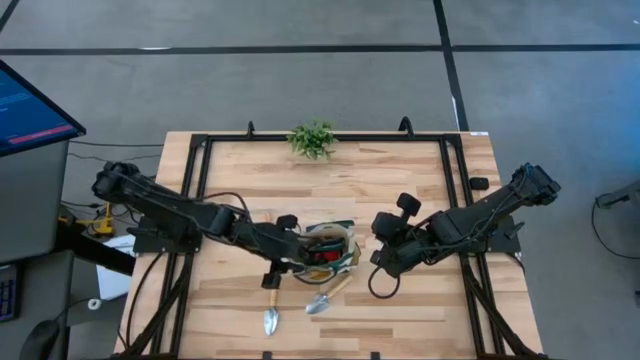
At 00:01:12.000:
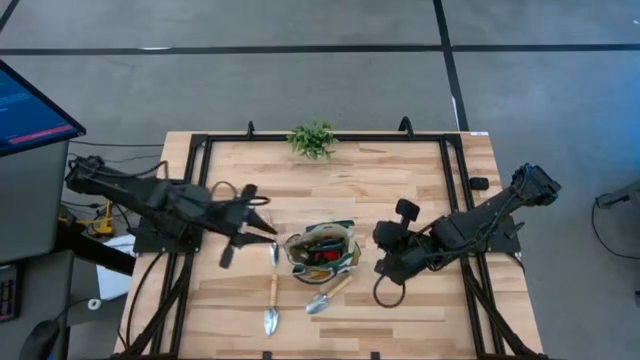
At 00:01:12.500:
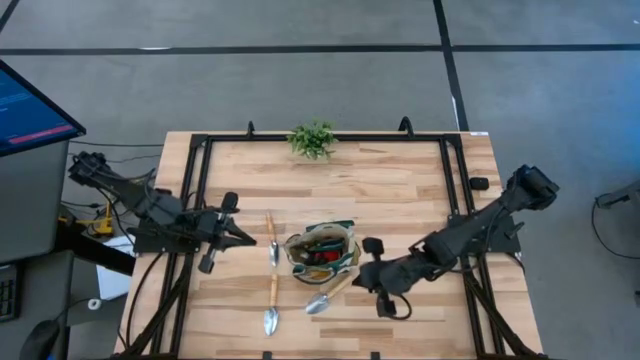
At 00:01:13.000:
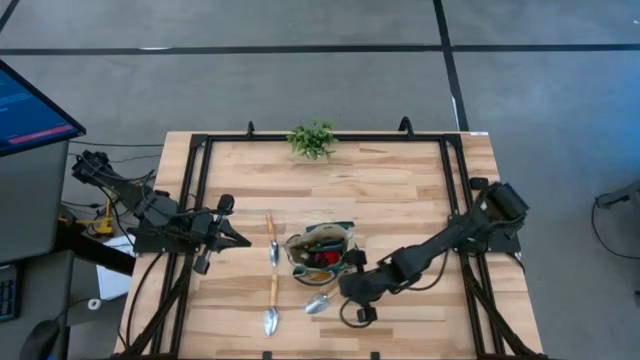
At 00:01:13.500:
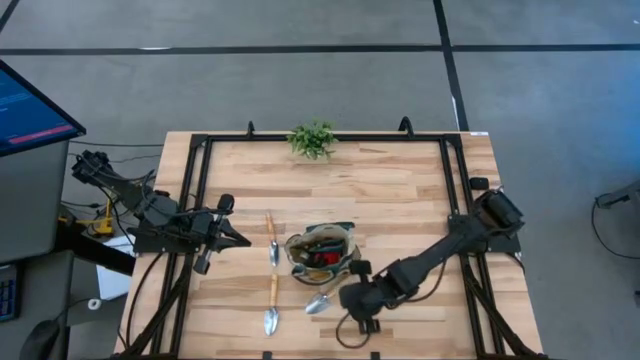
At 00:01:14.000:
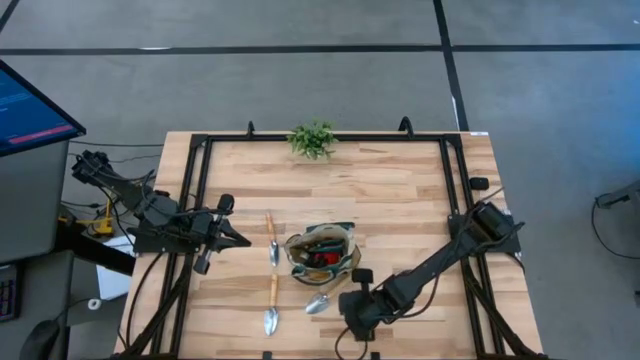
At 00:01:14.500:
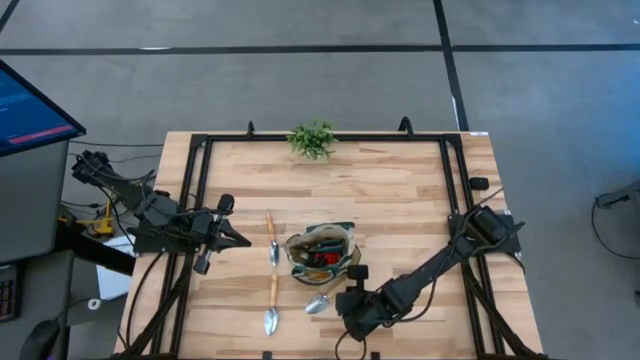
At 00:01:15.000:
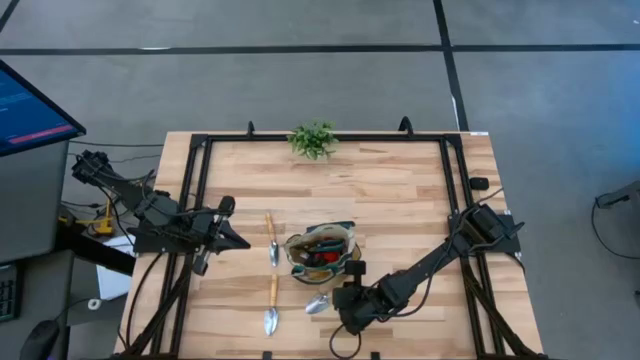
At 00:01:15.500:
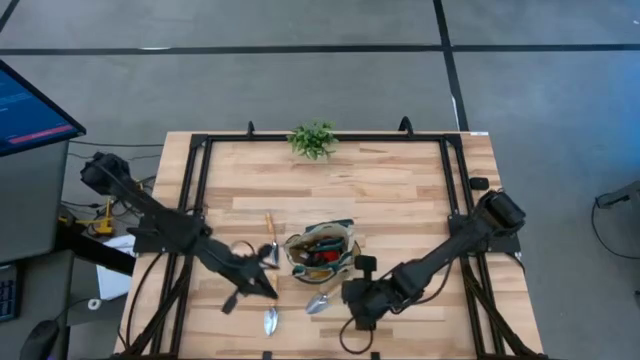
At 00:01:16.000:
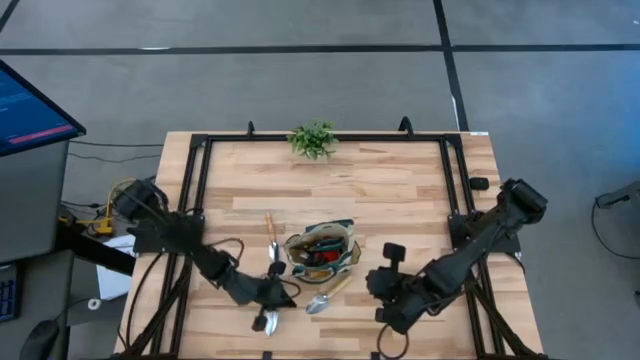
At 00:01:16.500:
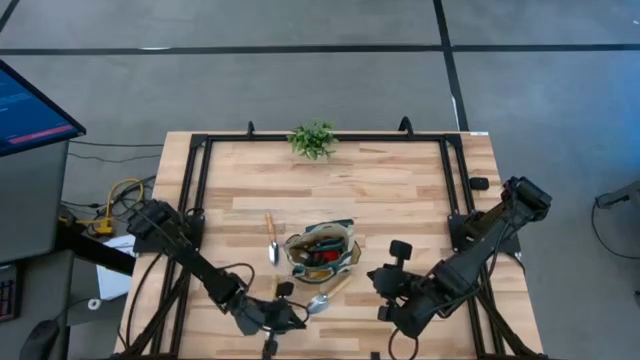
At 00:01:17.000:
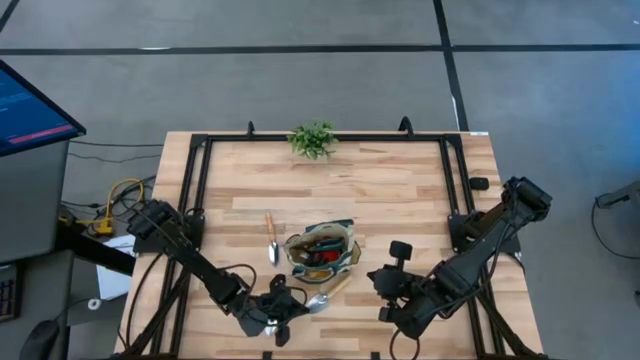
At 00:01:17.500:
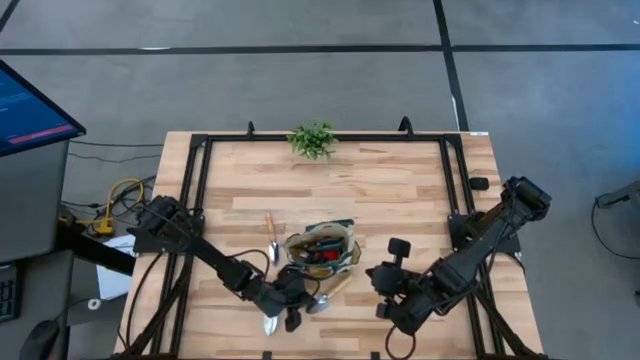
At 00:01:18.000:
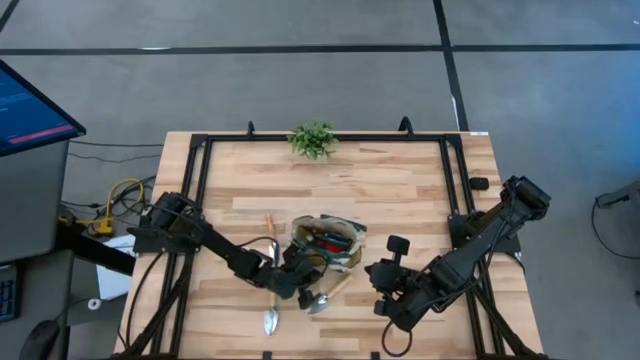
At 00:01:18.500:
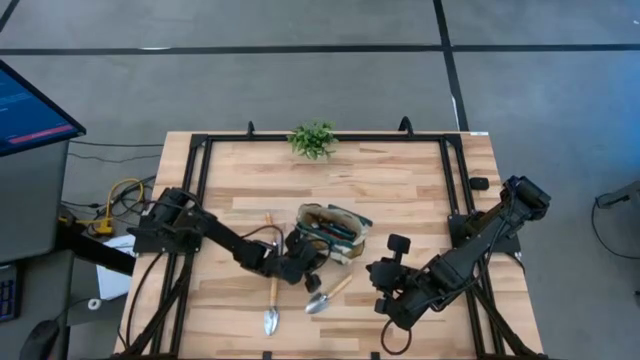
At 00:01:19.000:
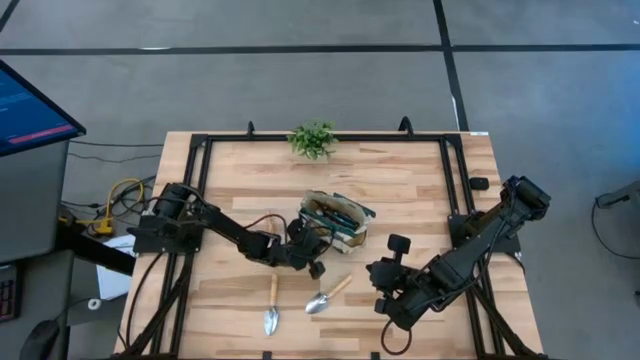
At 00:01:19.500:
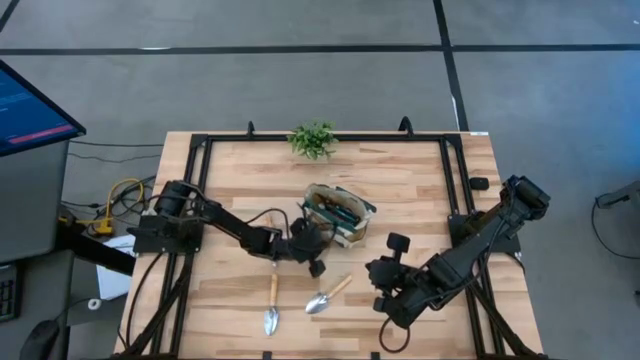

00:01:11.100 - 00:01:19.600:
Task: Pick & Place Garden tools in Gardening bag
Move the gardening bag

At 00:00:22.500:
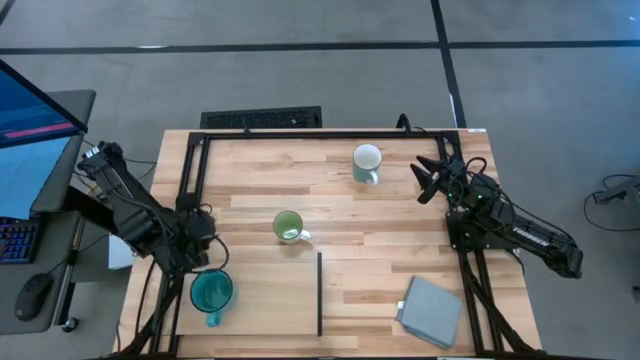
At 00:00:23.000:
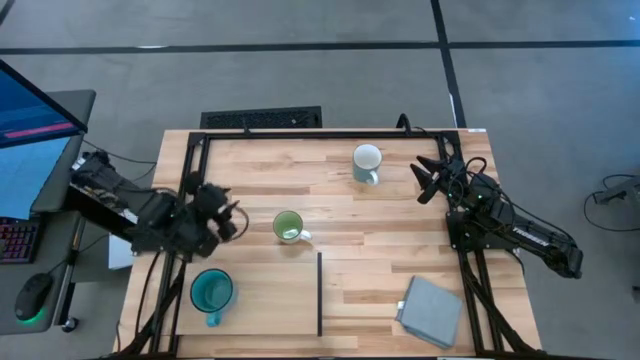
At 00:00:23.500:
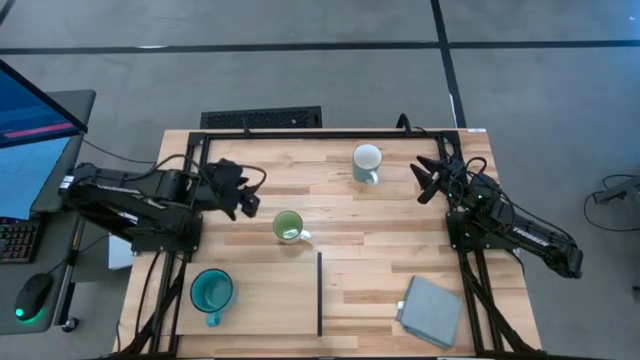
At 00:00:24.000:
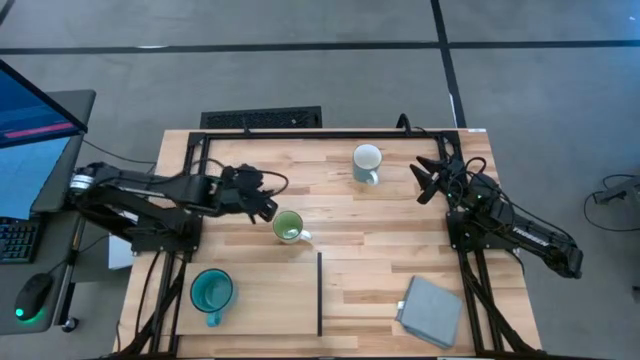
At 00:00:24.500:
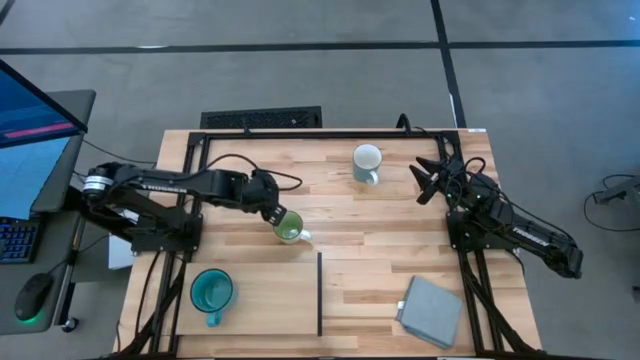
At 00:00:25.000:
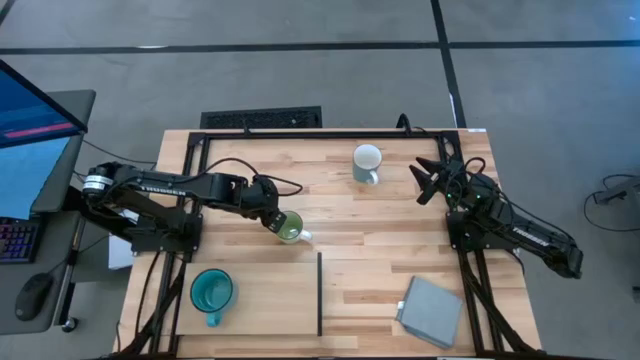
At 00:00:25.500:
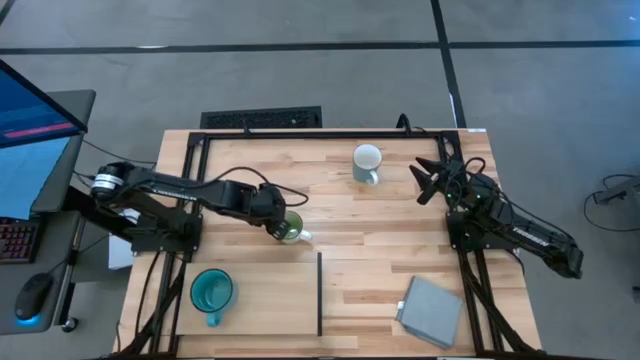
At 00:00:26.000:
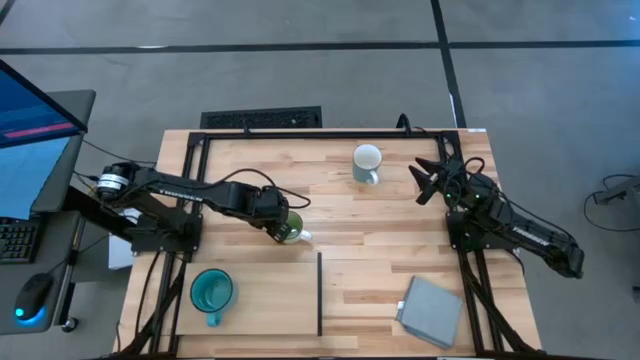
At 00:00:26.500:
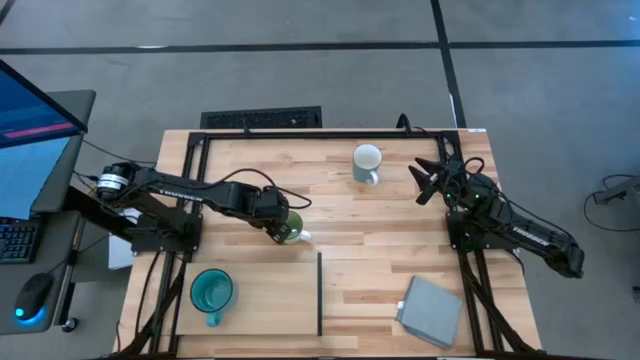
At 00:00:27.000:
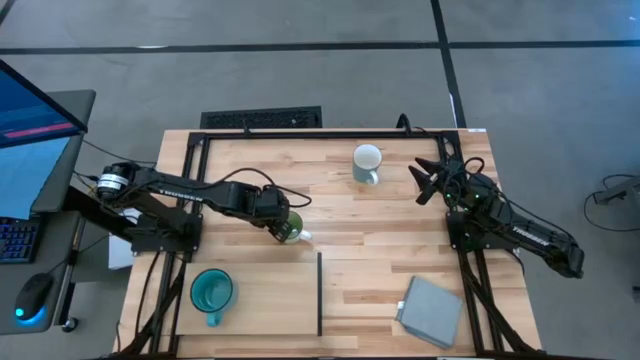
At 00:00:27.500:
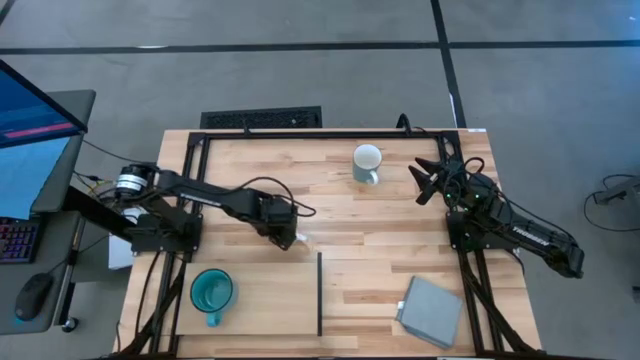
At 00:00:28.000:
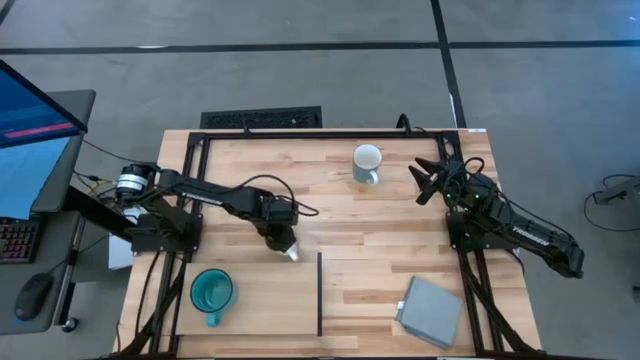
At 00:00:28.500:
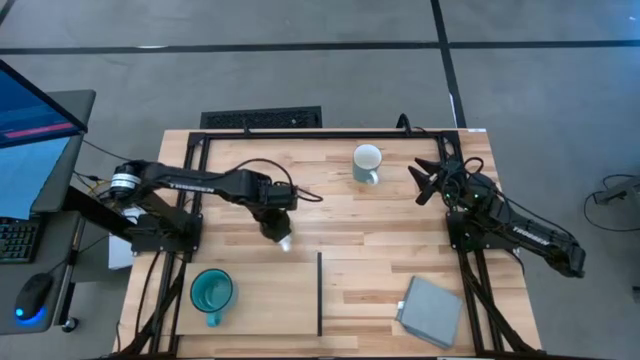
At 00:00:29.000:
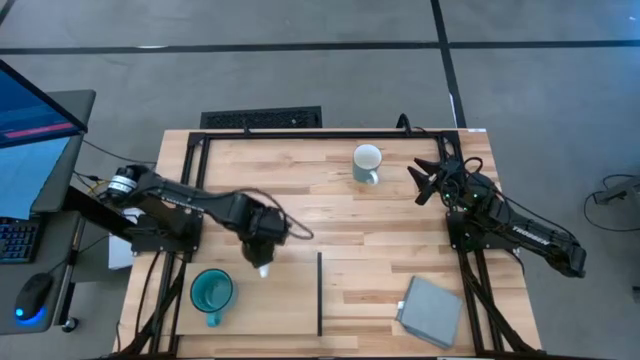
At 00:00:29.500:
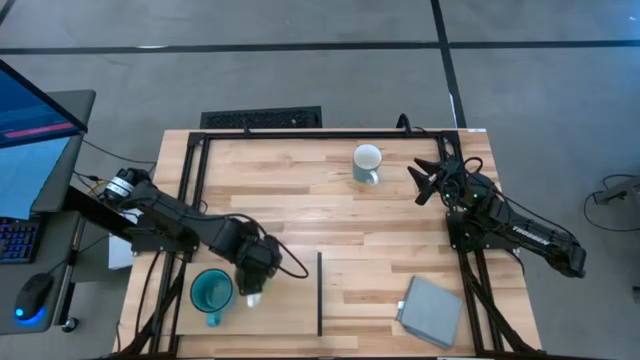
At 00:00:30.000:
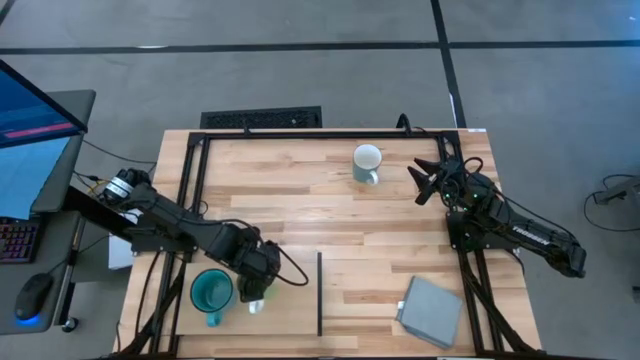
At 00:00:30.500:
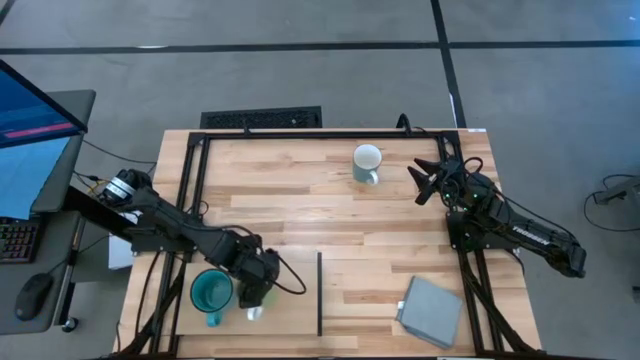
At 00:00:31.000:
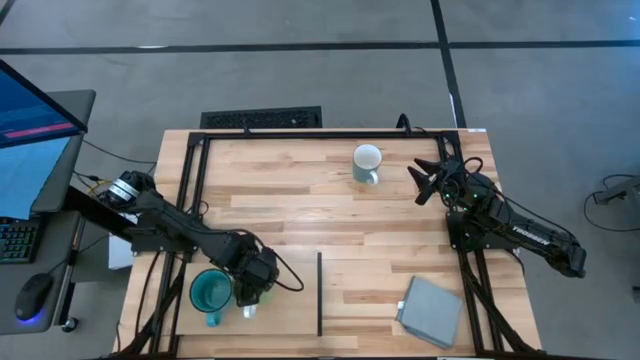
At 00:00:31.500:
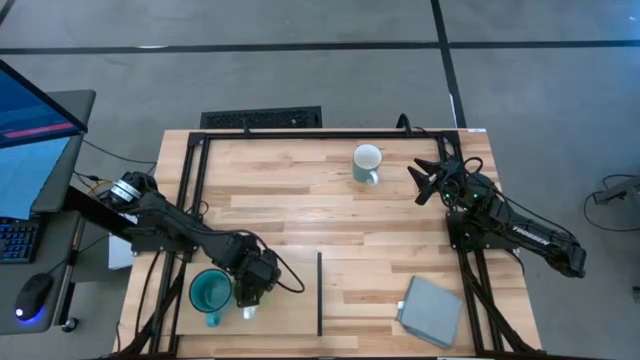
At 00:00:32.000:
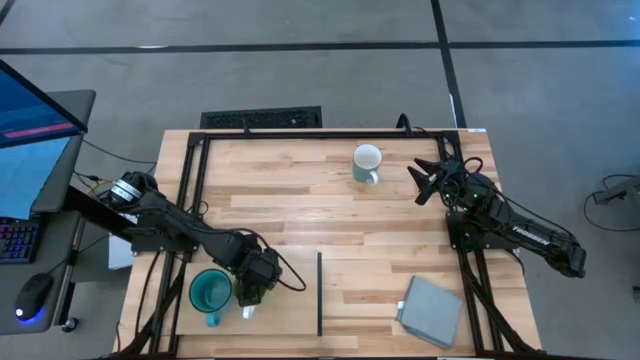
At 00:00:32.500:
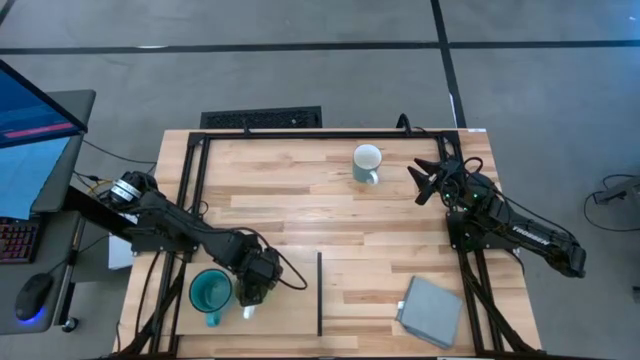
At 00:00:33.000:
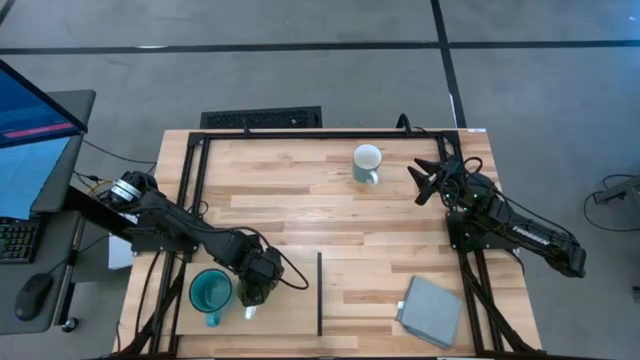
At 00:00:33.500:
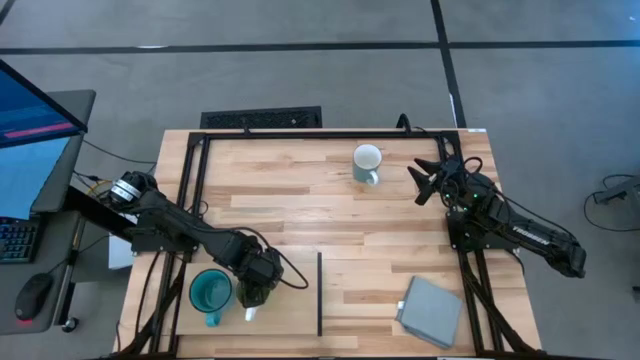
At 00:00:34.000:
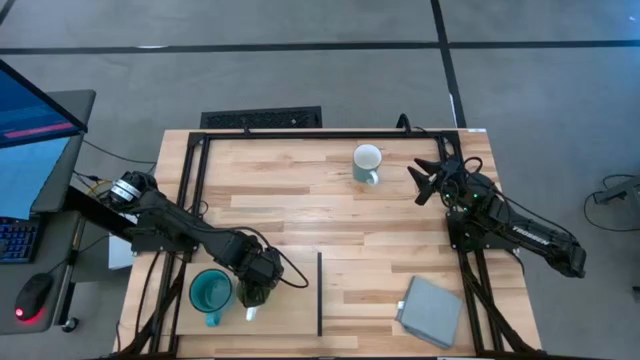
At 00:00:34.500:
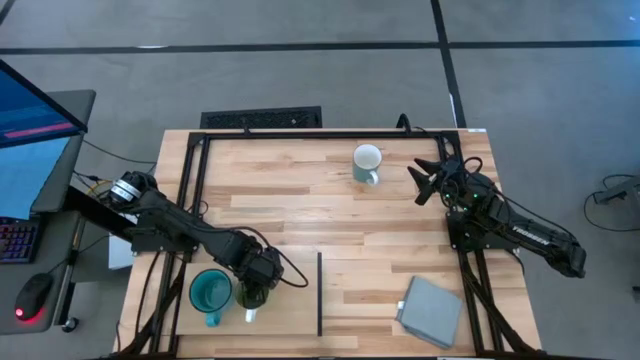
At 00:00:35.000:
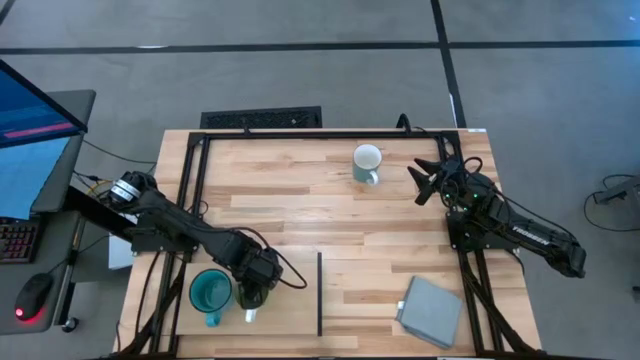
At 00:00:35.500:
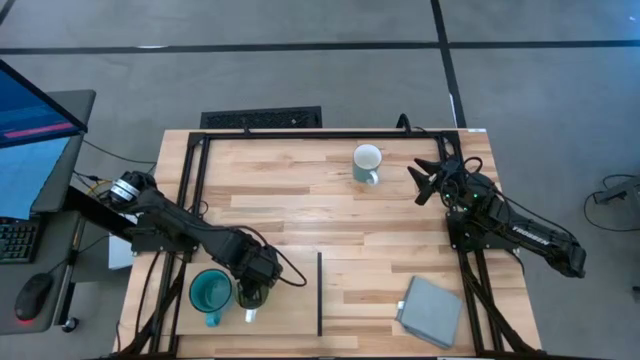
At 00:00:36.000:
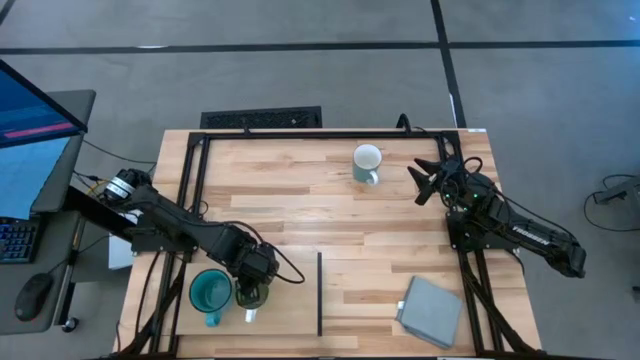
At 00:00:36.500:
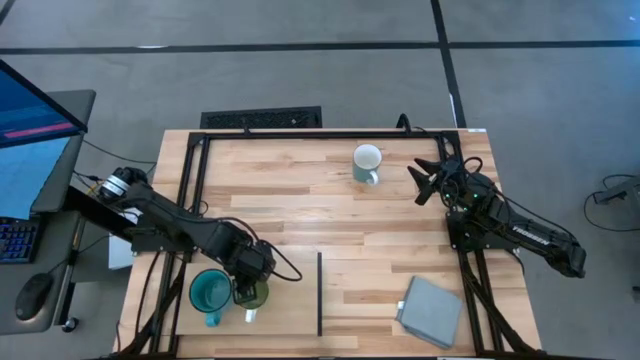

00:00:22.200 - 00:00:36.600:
Task: Stack small to large cups/mugs on shelf
Put the green mug on the shelf
